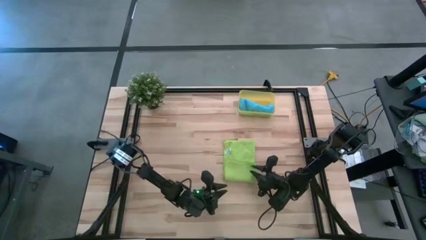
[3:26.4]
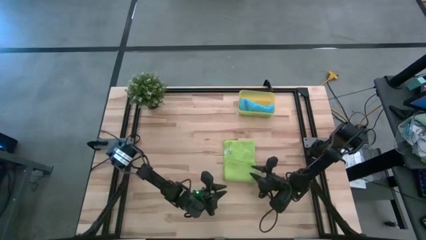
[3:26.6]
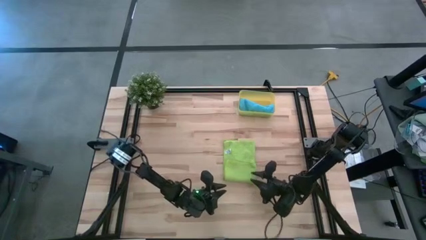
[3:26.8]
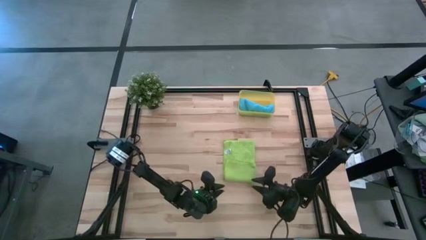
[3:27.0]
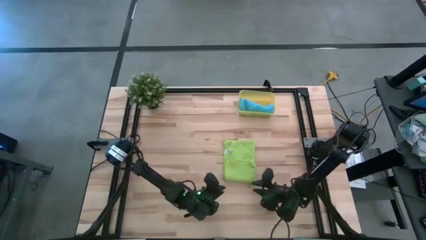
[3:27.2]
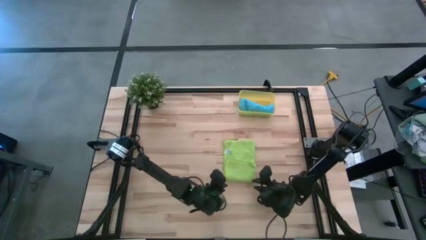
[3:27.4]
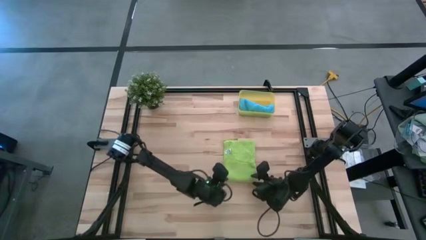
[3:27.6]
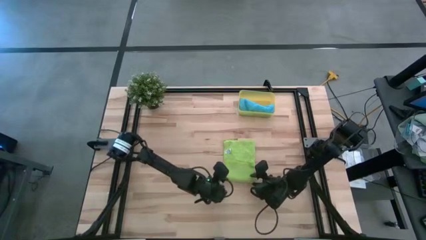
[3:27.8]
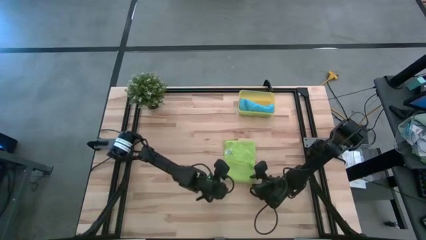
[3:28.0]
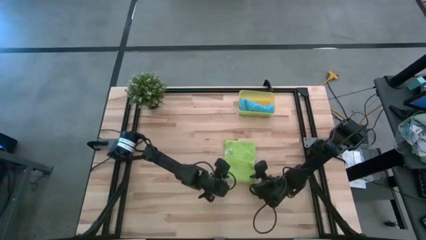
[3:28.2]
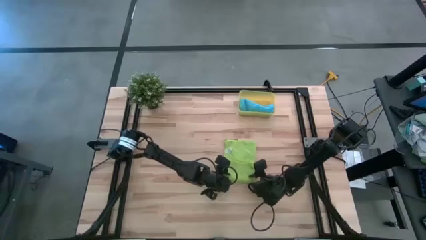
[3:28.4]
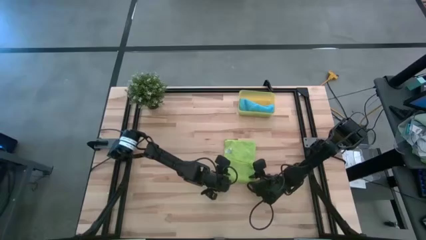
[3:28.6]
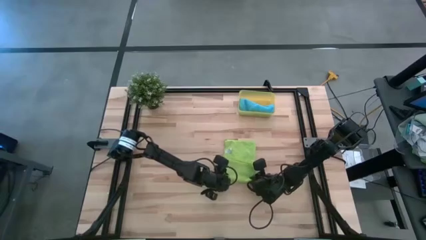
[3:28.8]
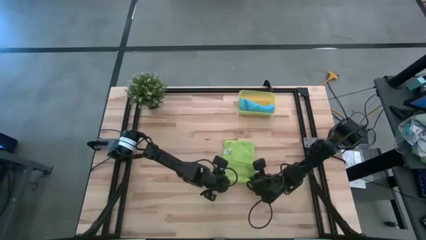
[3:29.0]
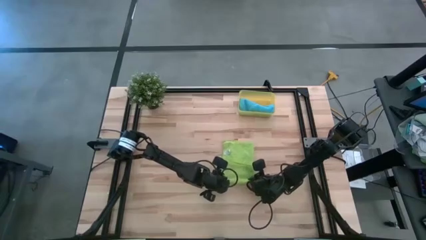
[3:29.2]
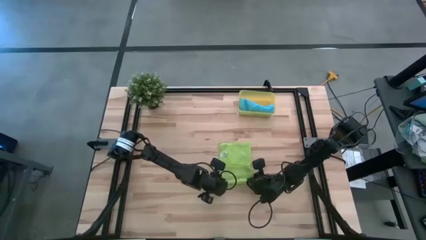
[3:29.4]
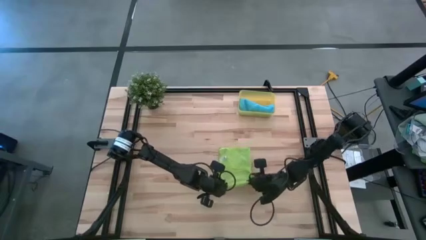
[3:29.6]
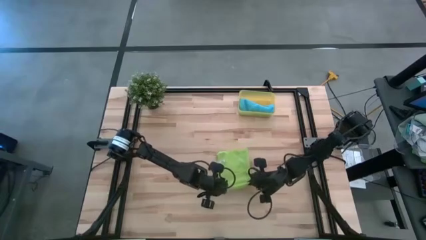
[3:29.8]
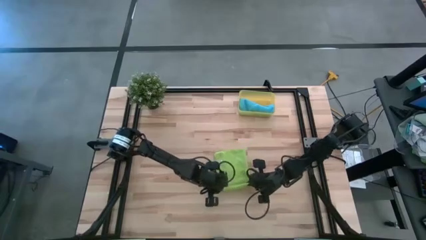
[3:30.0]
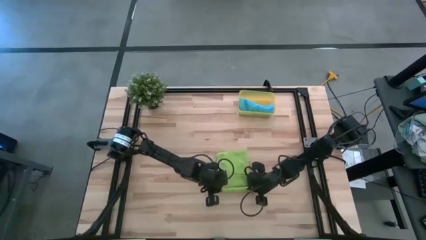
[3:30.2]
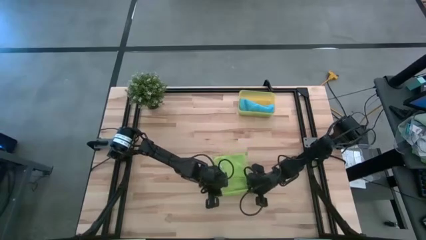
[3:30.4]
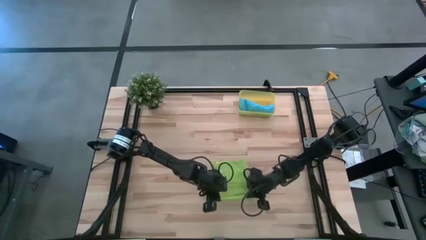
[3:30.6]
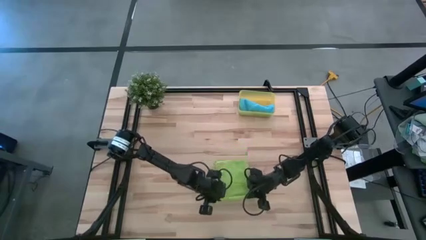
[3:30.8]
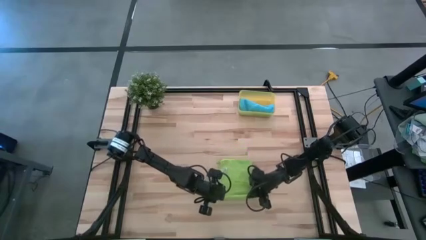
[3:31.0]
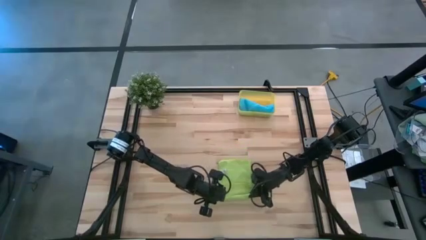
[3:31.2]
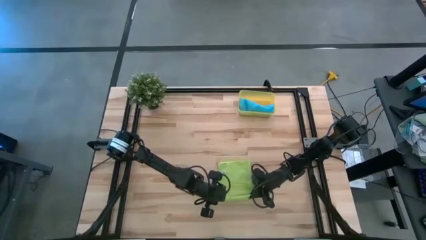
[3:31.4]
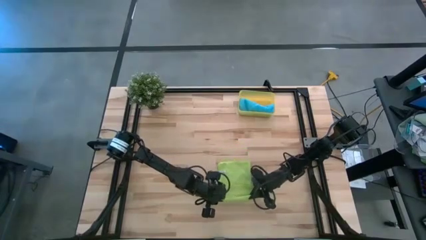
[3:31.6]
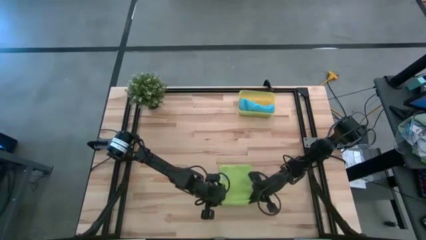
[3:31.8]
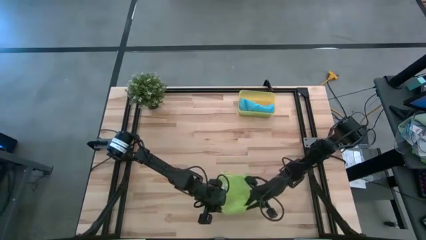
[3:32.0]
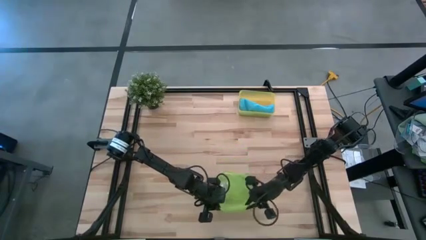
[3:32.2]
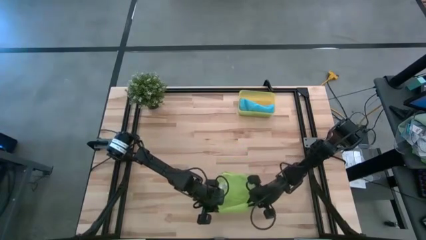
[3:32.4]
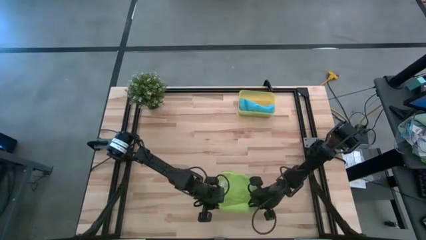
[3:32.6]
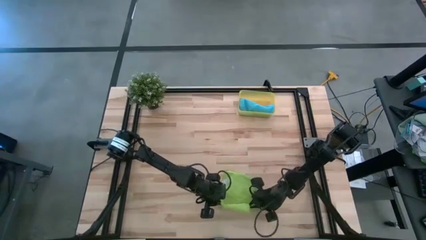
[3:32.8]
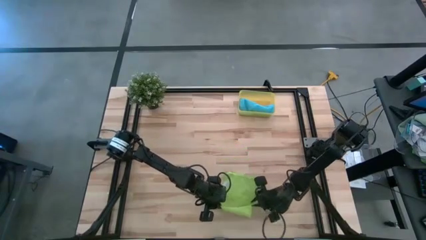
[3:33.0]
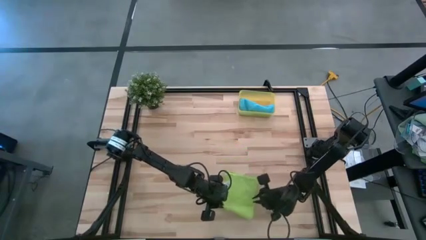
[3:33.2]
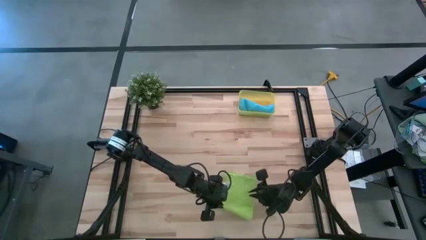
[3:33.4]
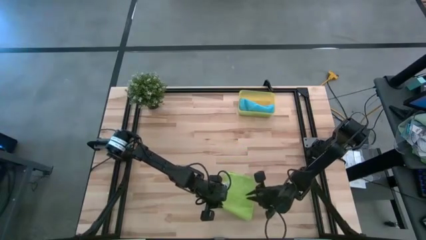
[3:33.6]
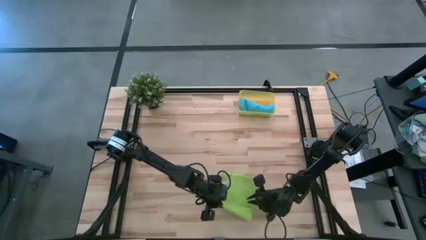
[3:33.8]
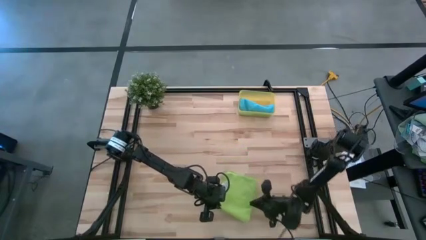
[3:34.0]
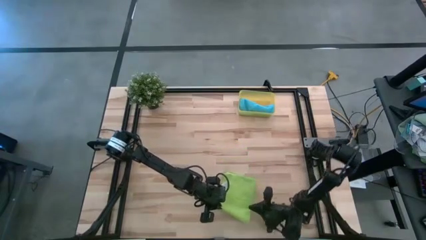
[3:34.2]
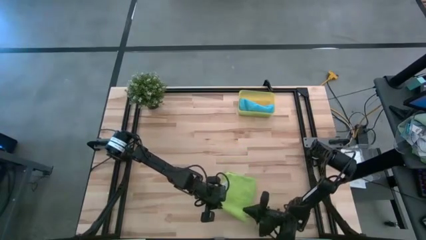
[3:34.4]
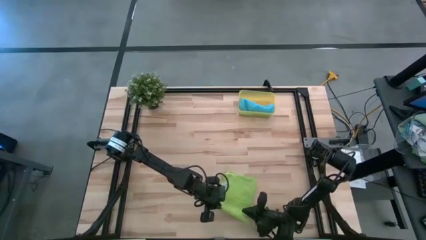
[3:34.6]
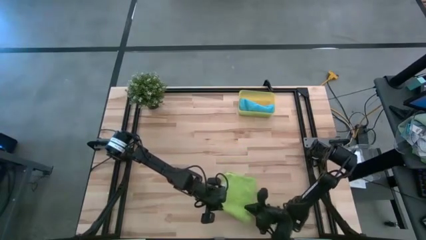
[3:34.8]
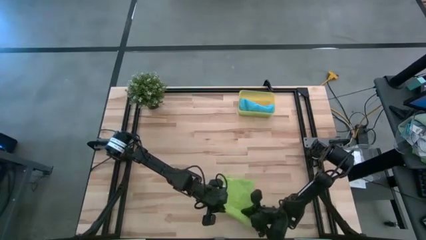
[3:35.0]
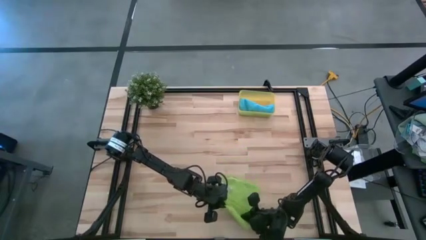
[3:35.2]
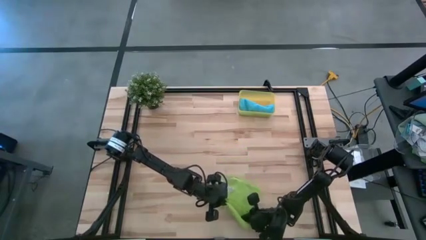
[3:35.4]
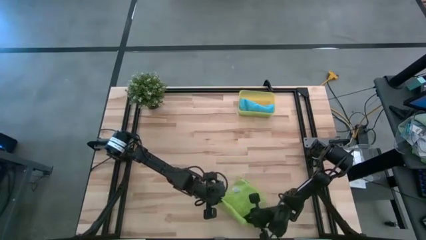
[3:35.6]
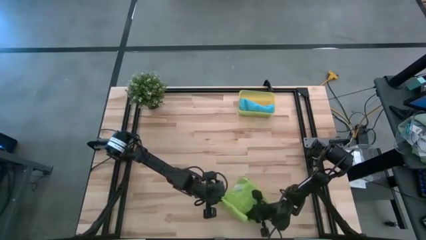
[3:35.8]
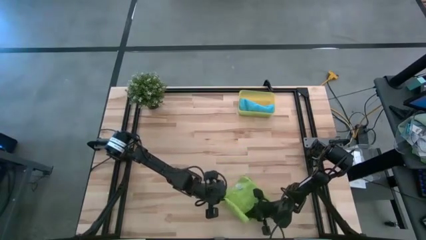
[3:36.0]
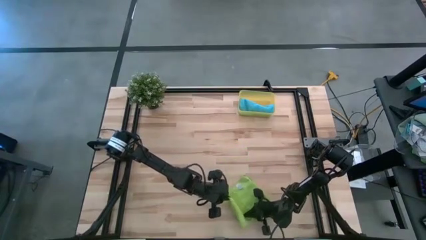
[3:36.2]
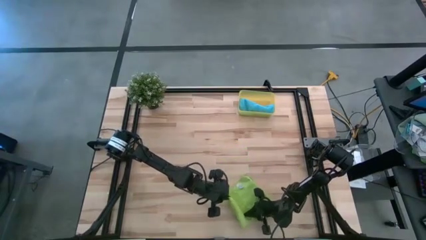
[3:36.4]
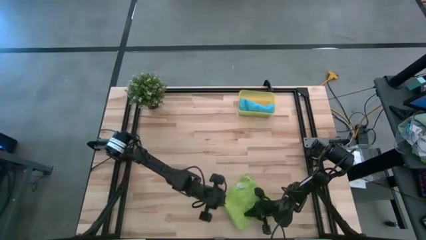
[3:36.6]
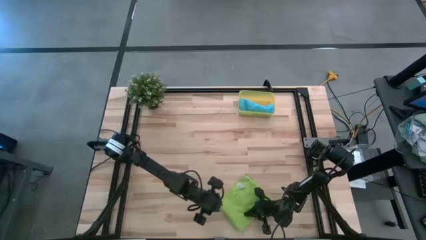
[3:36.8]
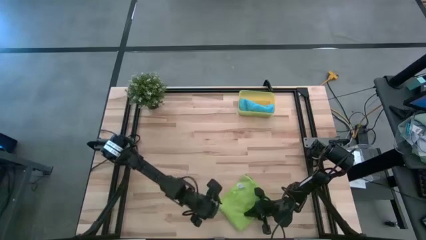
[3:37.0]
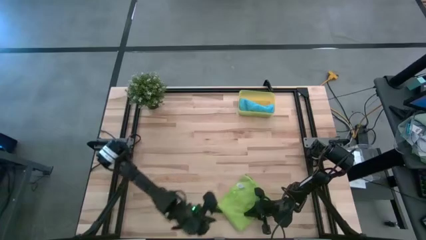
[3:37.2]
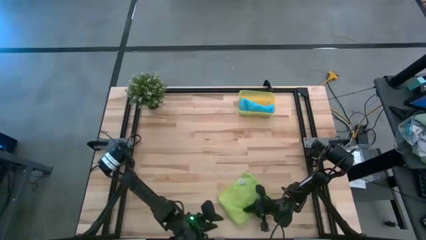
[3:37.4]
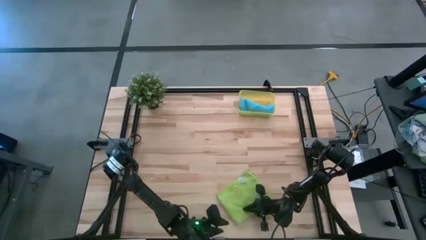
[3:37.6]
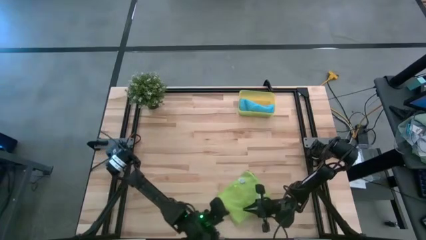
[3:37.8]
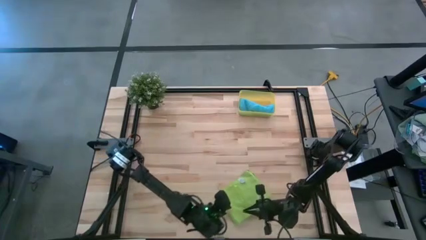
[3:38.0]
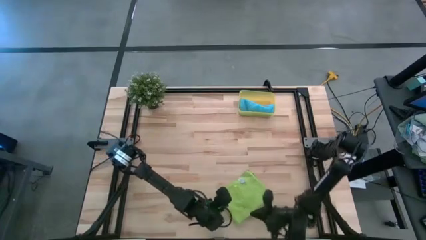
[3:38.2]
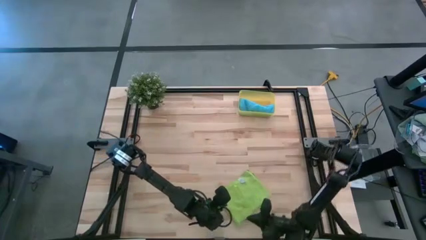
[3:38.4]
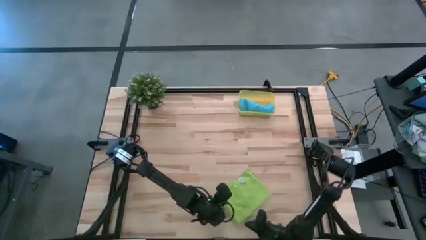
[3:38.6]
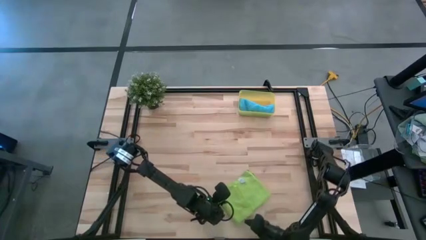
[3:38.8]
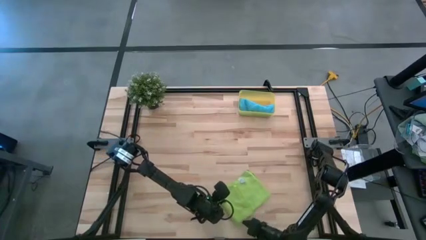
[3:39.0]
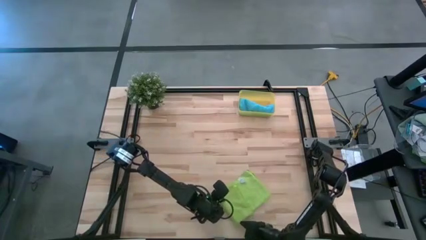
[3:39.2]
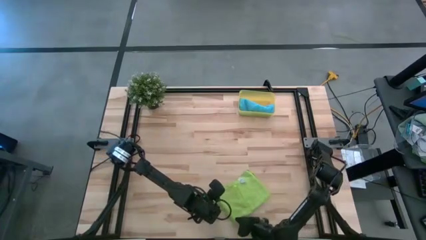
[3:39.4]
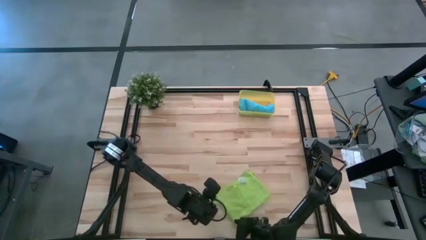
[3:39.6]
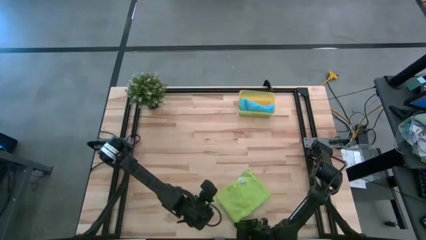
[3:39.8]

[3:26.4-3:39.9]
Task: Roll microfiber towels into tight, uniform cylinder then place into a basket
Roll the green microfiber towel
